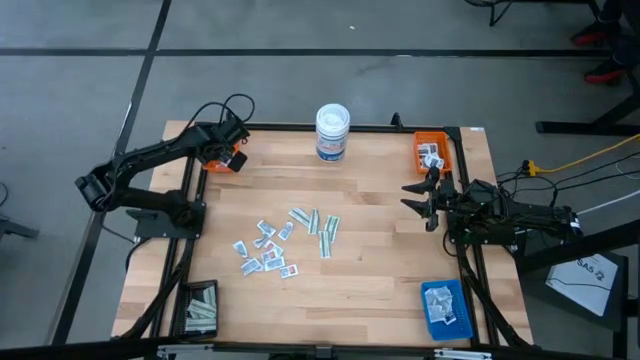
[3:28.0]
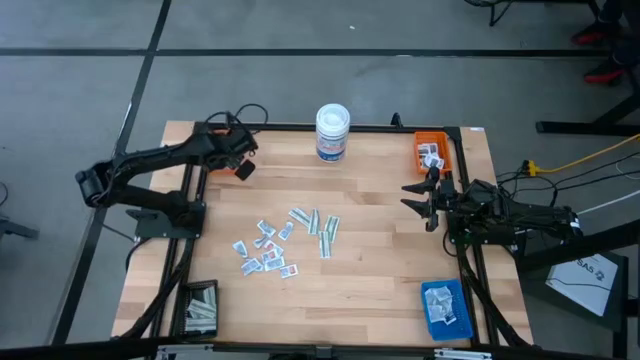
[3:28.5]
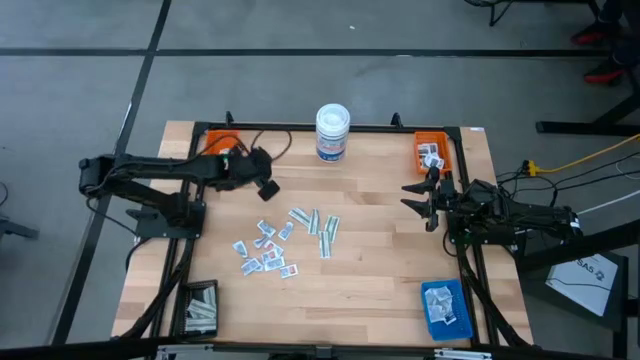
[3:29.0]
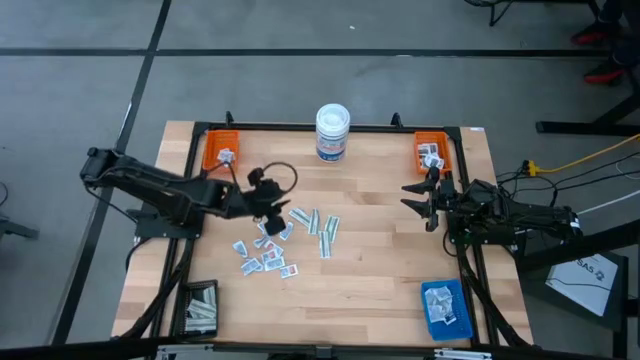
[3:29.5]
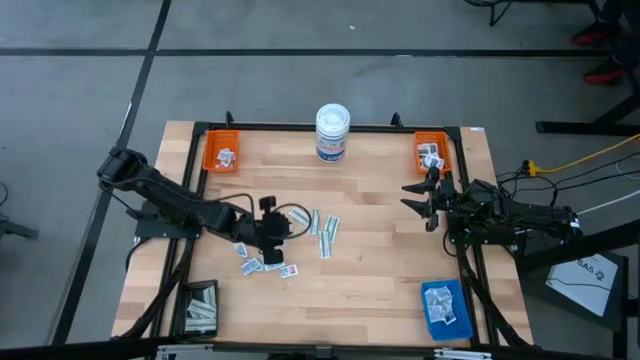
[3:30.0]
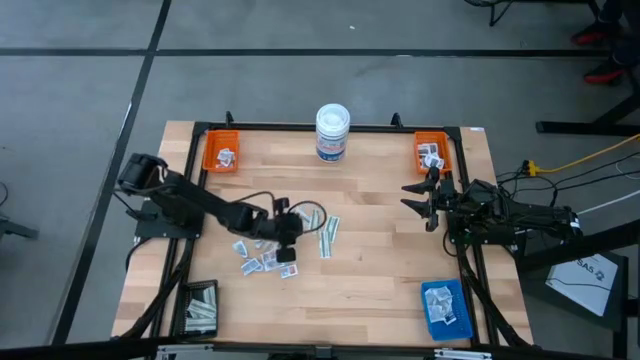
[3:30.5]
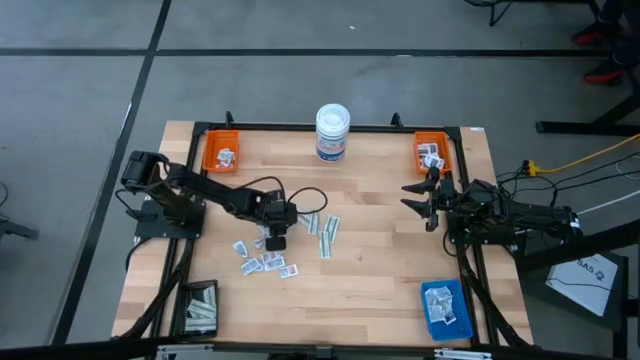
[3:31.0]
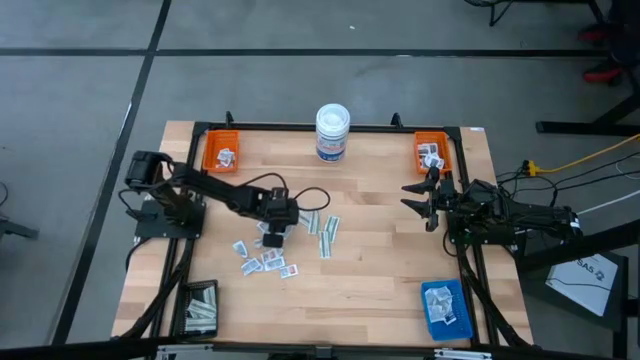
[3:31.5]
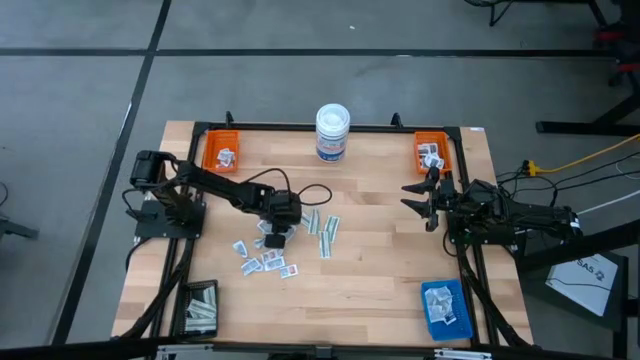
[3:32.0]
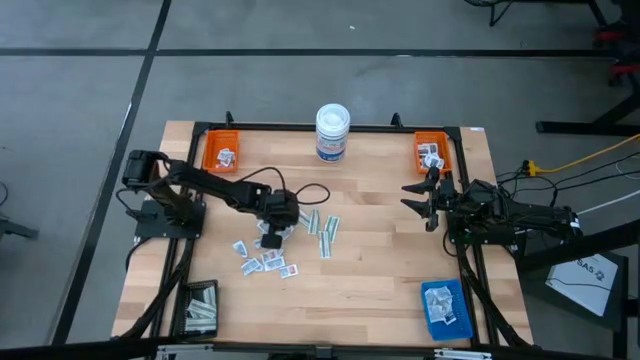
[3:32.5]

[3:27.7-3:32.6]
Task: Pick & Place First Aid Supplies
Put the orange ointment pack into the left orange bin

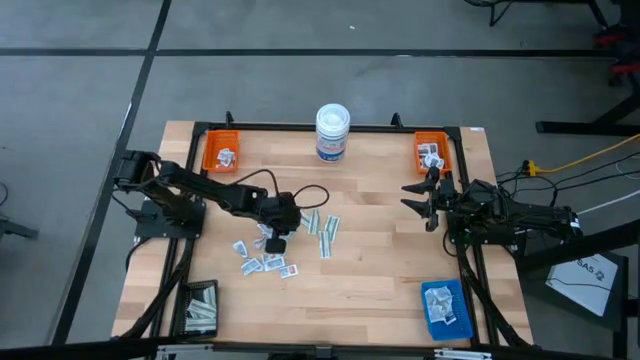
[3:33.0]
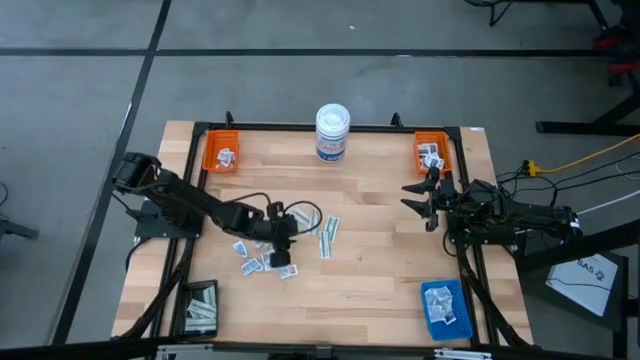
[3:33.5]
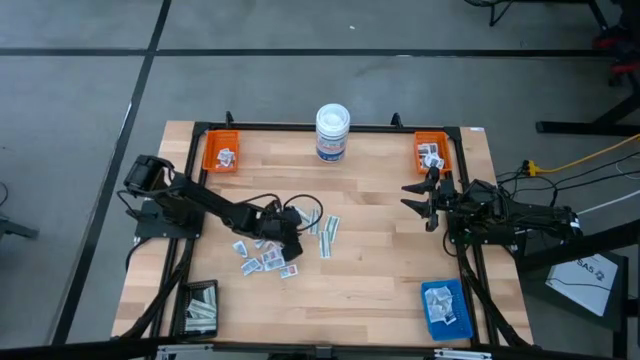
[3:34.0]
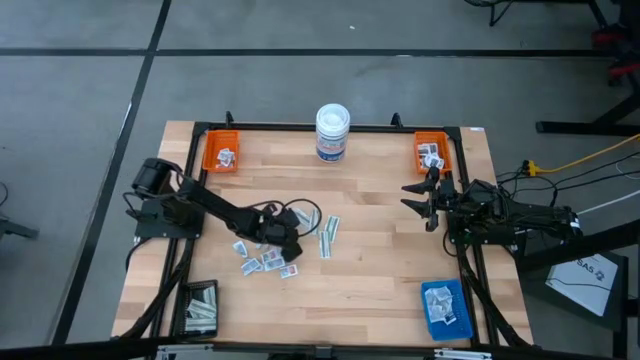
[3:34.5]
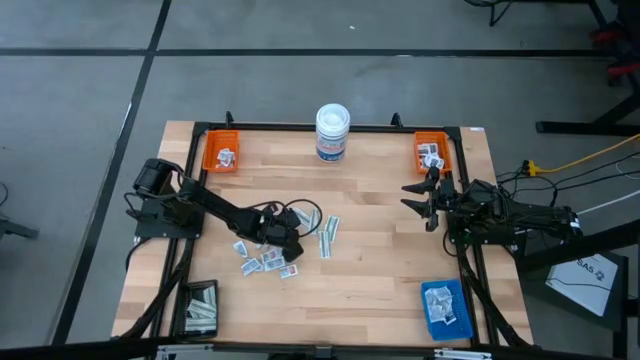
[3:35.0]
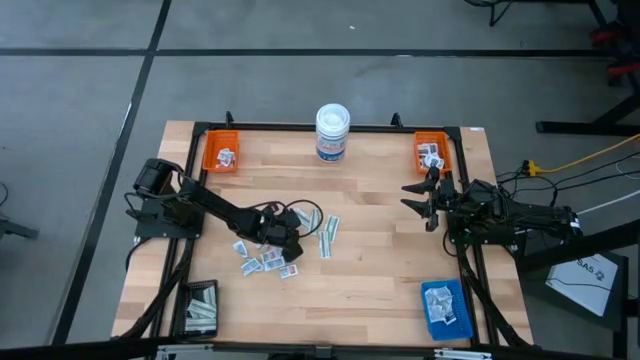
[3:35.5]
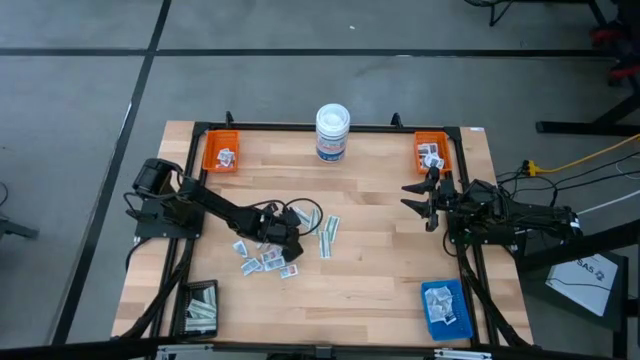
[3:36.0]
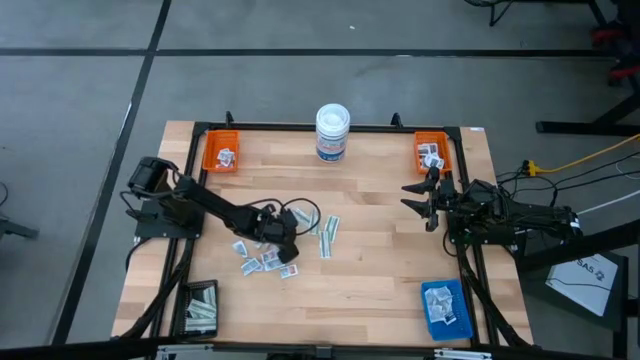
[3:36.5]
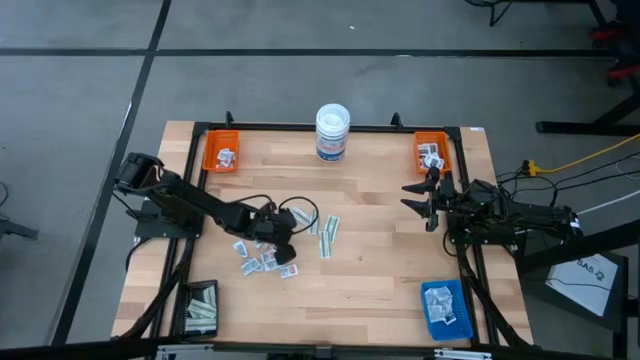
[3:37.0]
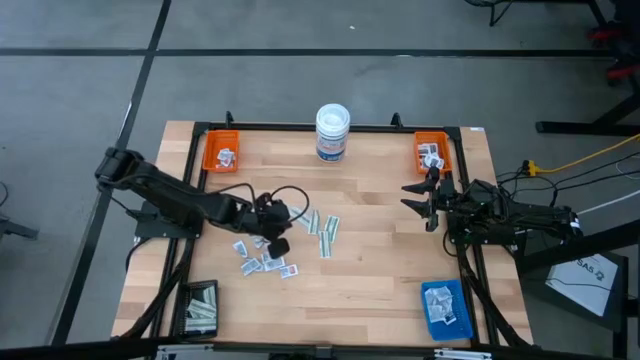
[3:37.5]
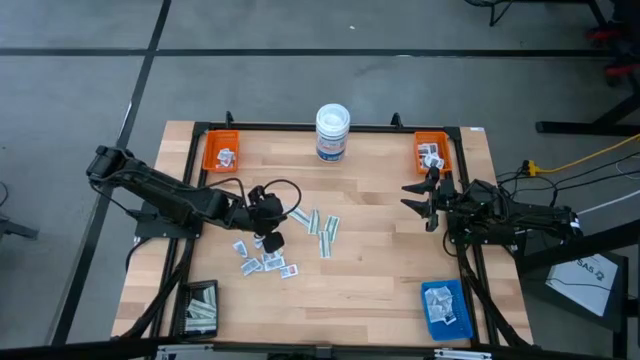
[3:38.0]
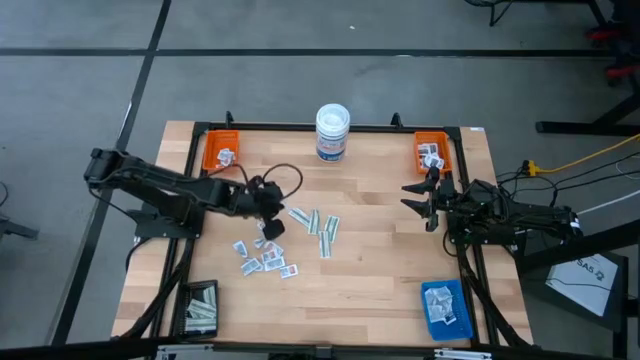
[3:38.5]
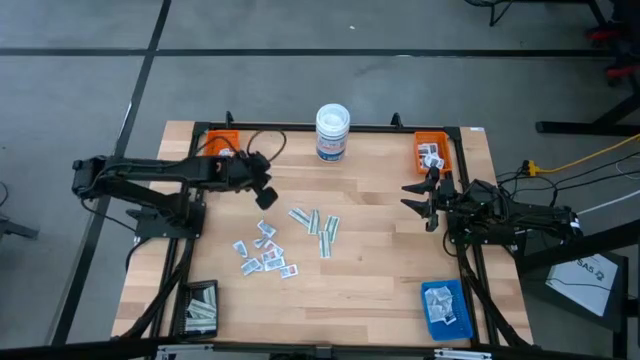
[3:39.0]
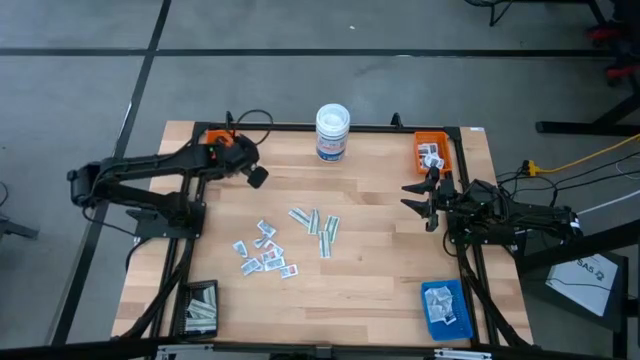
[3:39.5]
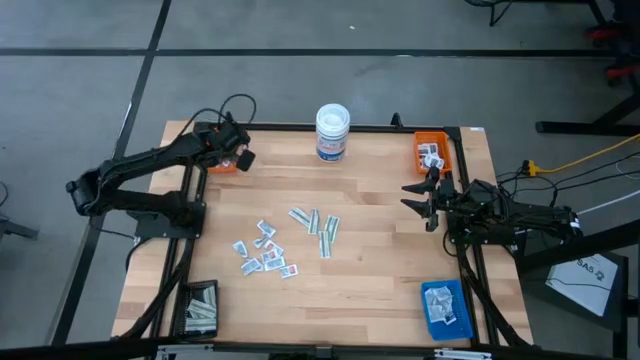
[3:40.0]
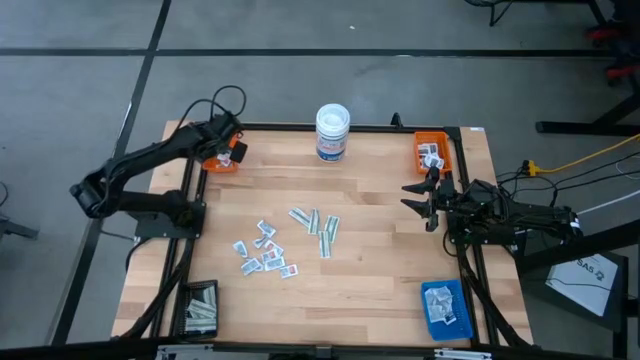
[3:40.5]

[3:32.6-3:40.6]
Put the orange ointment pack into the left orange bin

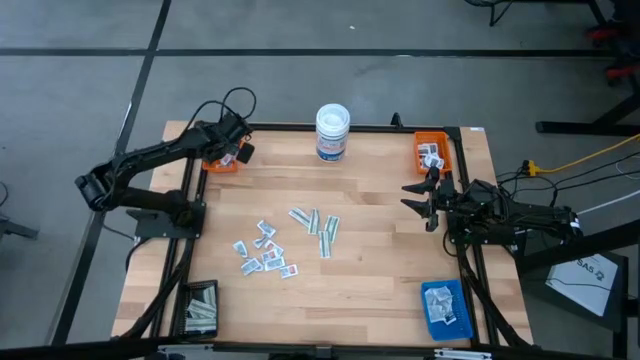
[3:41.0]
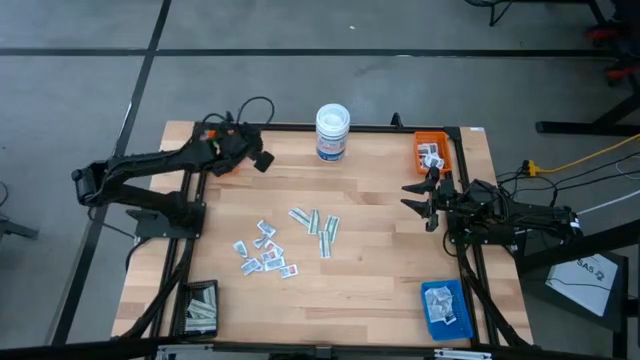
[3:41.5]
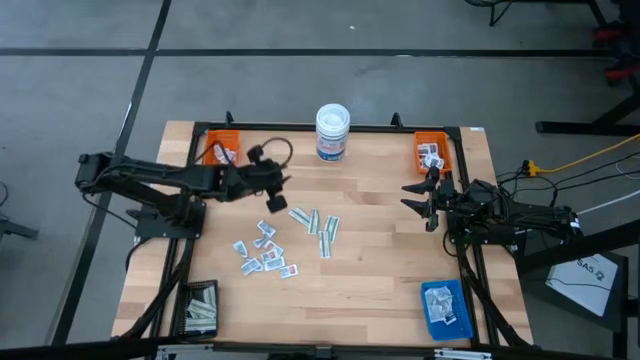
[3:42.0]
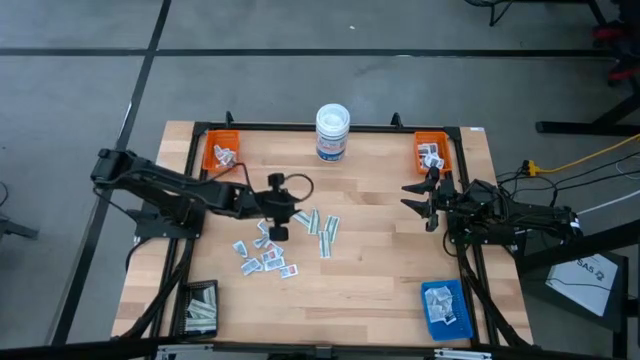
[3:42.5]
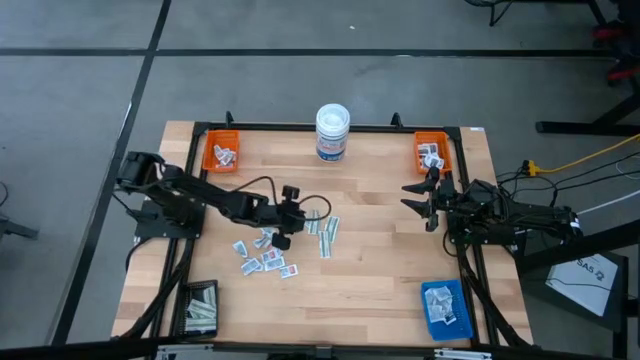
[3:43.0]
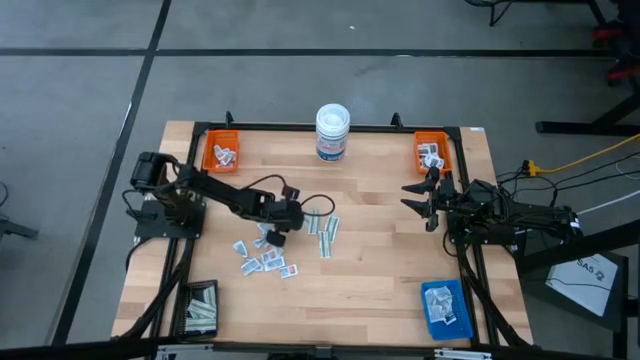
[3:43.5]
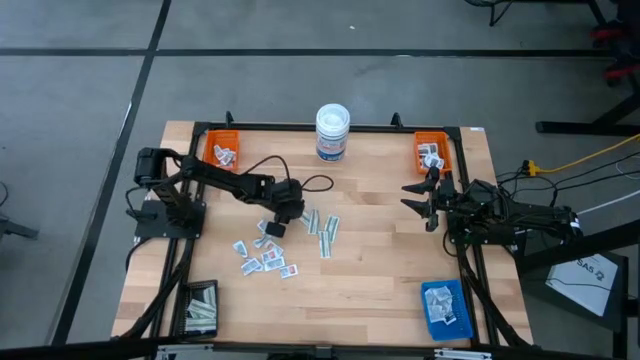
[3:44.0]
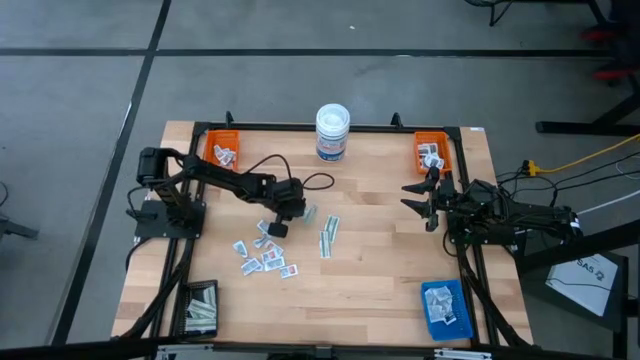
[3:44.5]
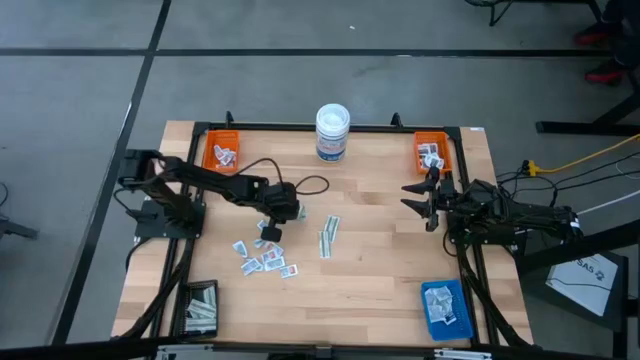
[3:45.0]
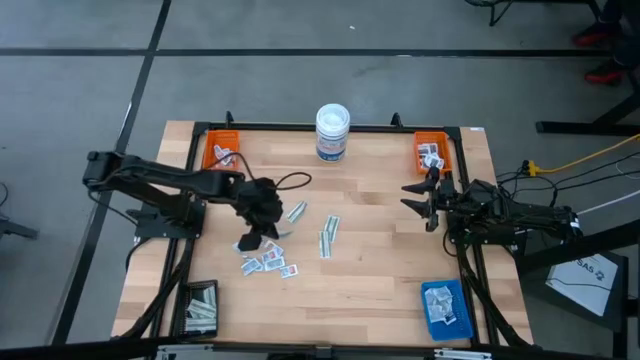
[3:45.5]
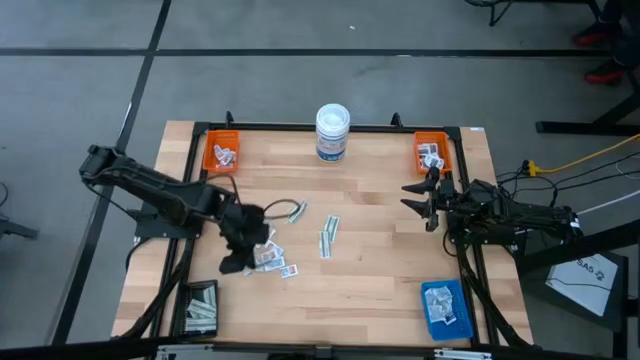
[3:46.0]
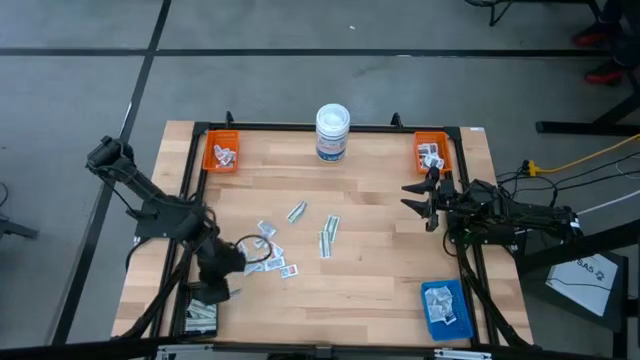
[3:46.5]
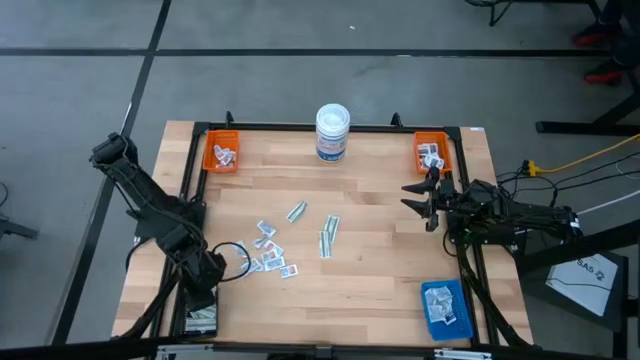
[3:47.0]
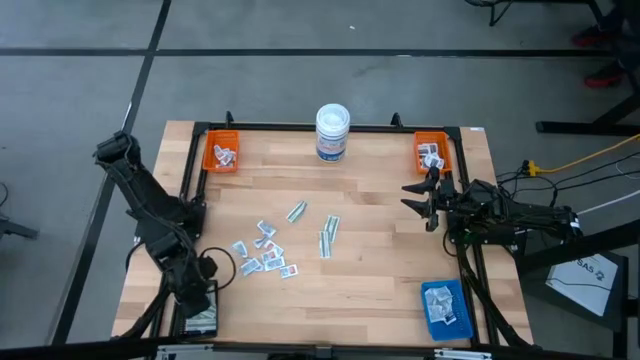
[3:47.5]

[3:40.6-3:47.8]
Put the green bandage pack into the black bin

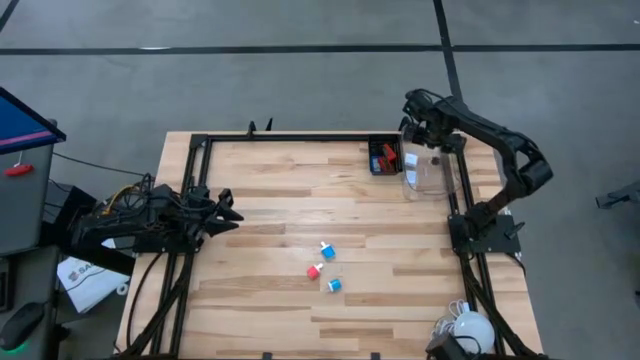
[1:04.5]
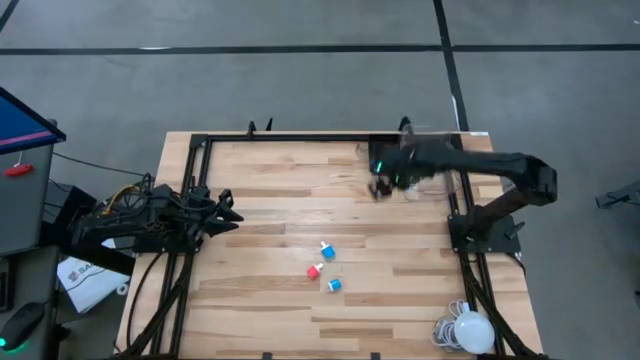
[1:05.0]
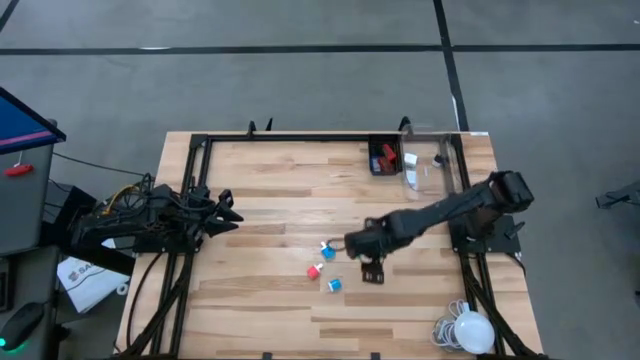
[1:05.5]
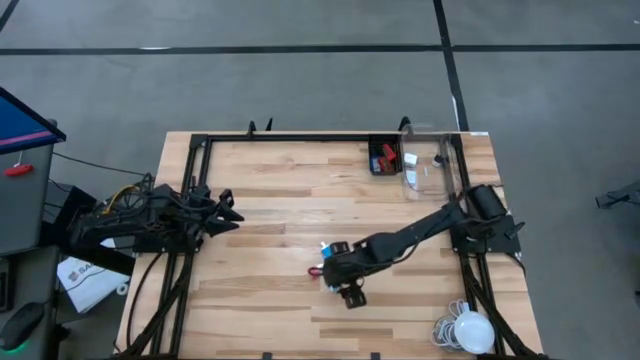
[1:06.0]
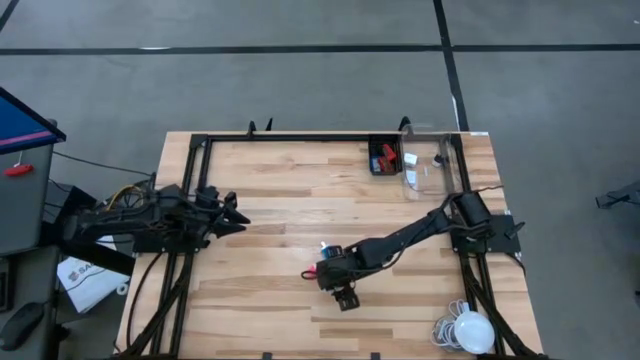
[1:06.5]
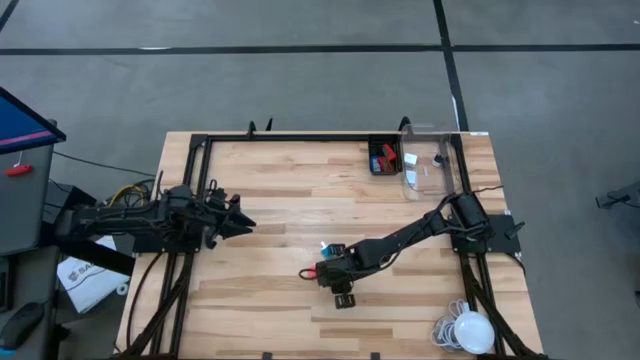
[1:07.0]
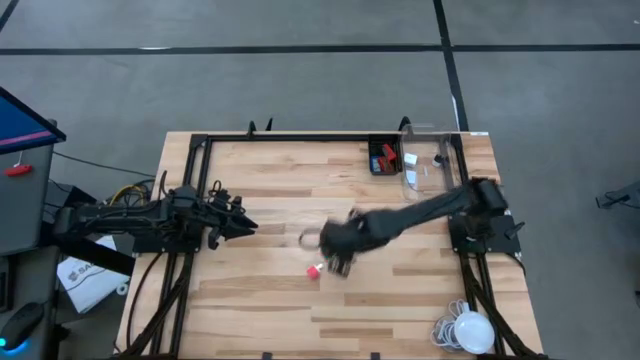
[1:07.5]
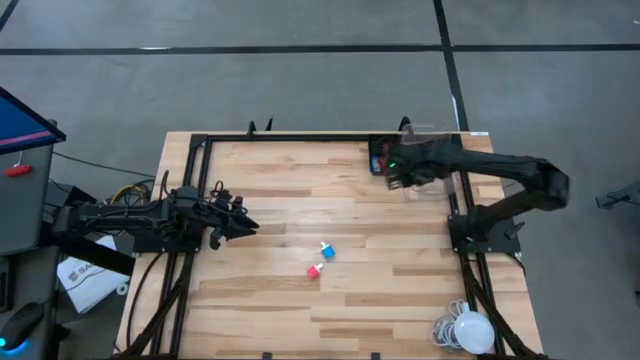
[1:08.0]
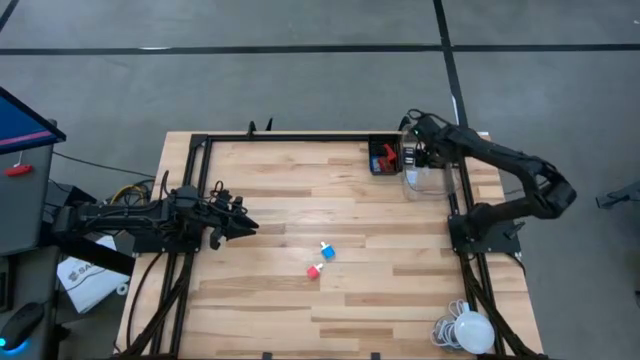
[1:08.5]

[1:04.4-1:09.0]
Task: Pick & Place Office items
Put the bottom blue and white charger adapter into the transparent bin
